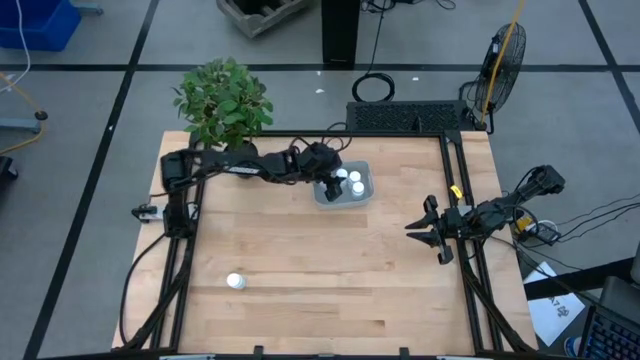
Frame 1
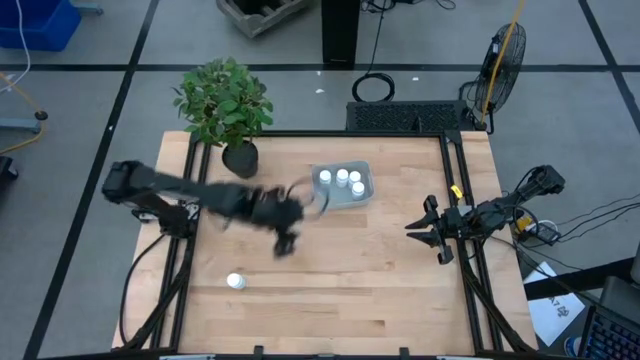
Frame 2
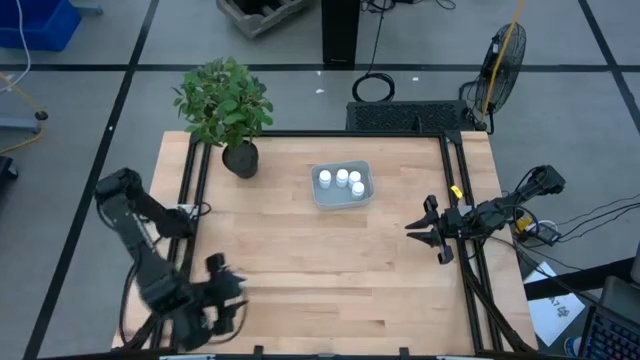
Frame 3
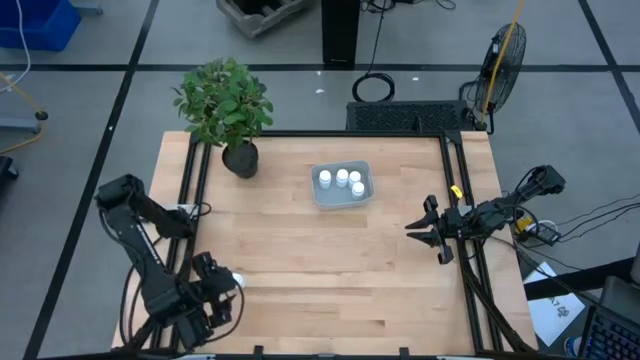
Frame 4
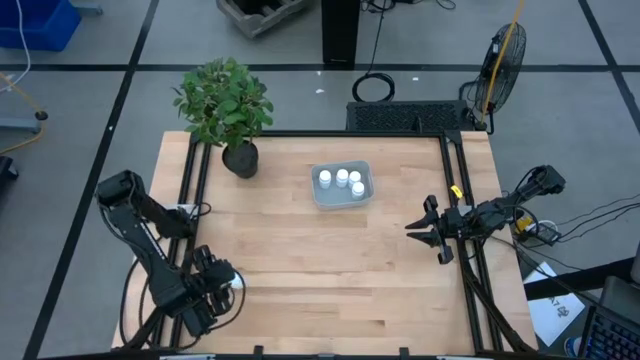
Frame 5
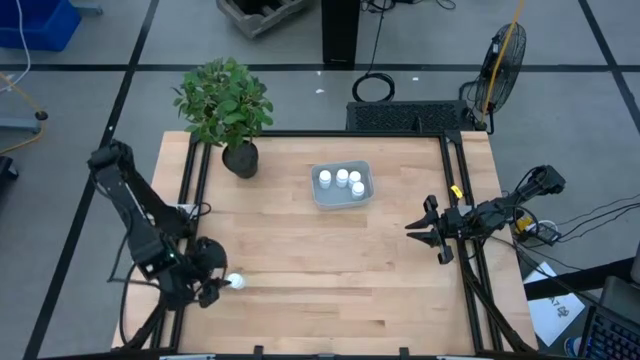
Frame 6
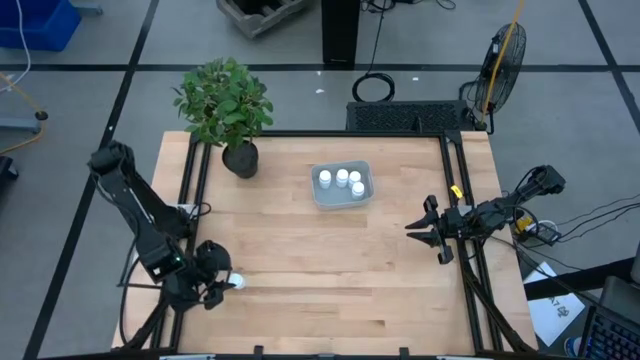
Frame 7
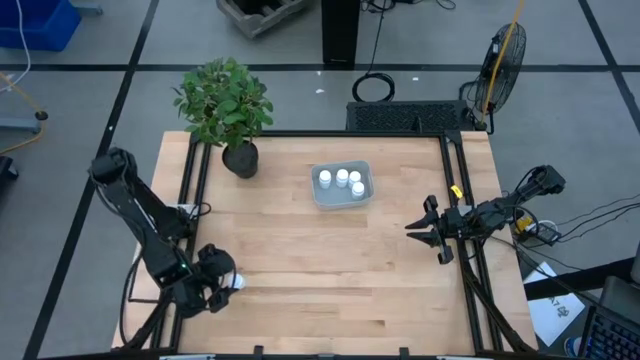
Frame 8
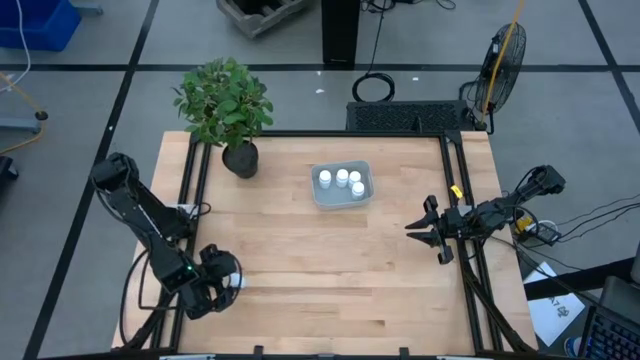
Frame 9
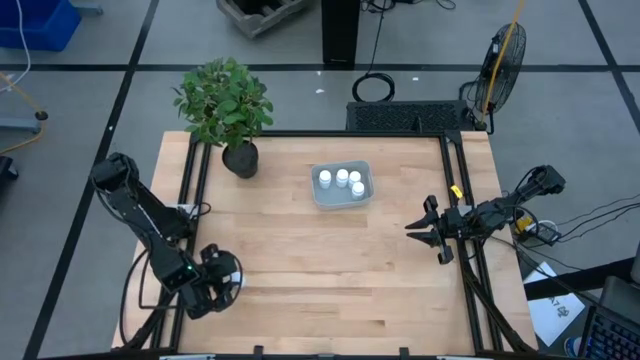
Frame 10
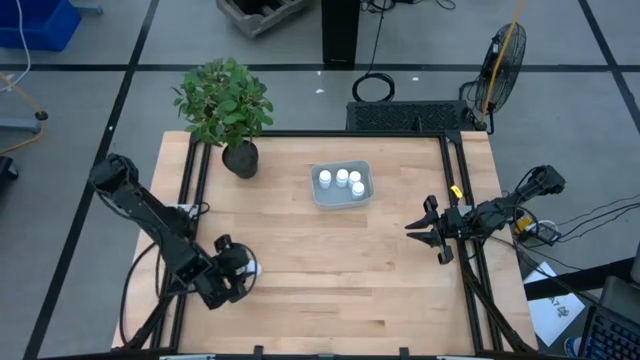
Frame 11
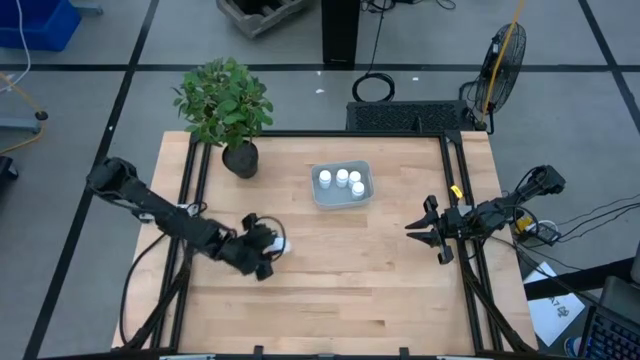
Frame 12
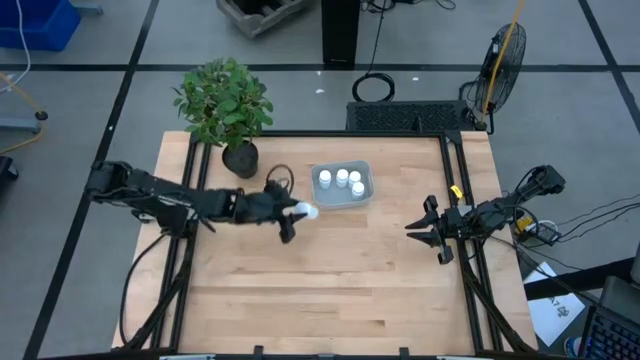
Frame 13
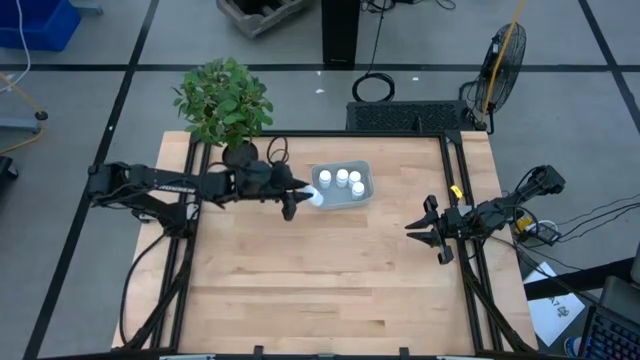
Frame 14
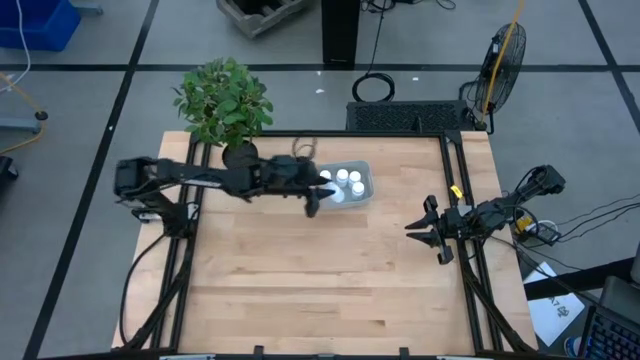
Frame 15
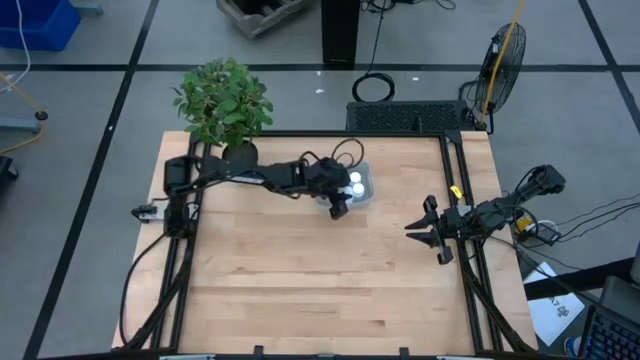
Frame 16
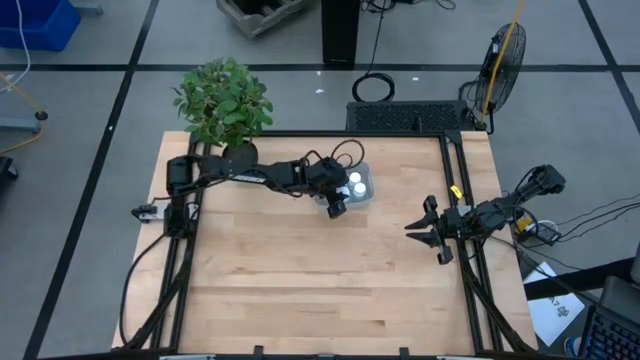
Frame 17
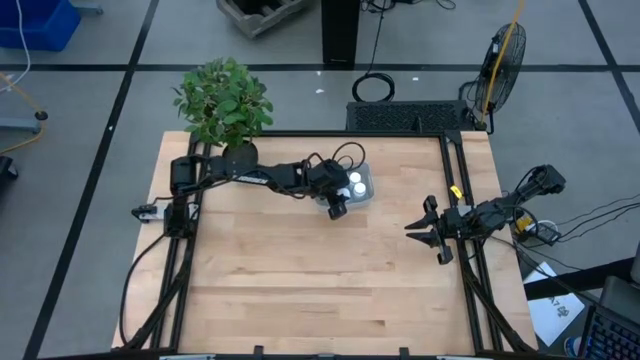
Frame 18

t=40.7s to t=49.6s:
Task: Pick and place pill bottles into a basket
Put the white pill bottle into the white bin

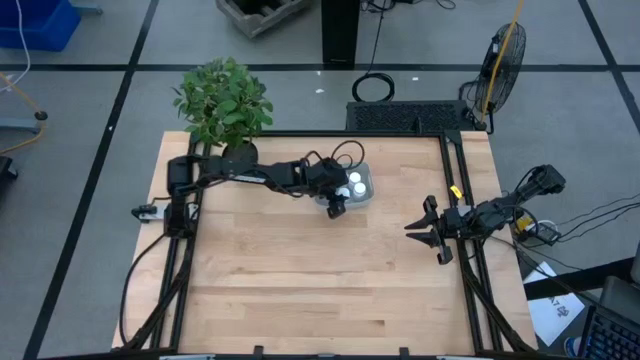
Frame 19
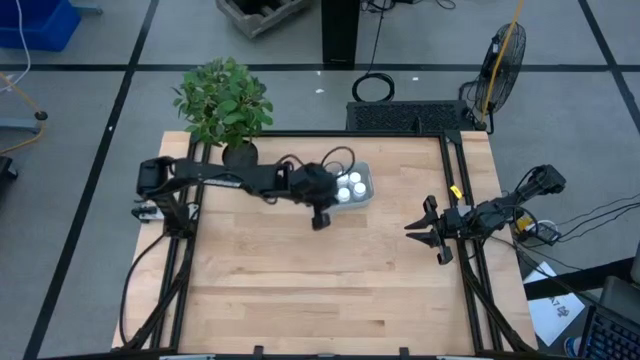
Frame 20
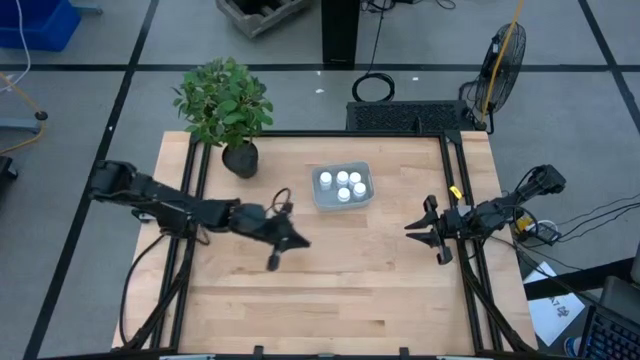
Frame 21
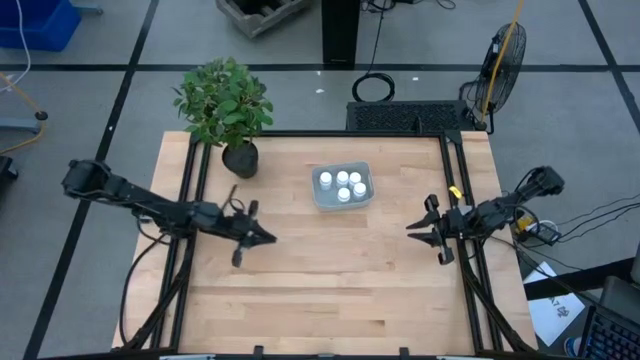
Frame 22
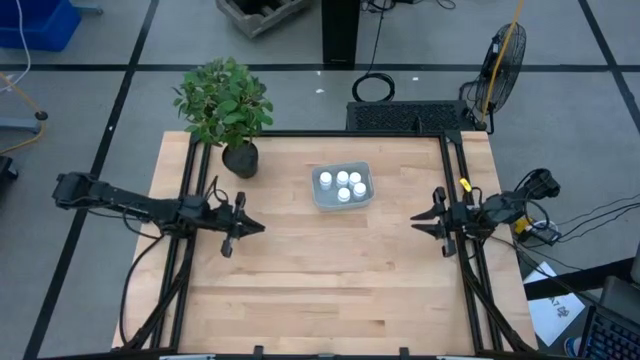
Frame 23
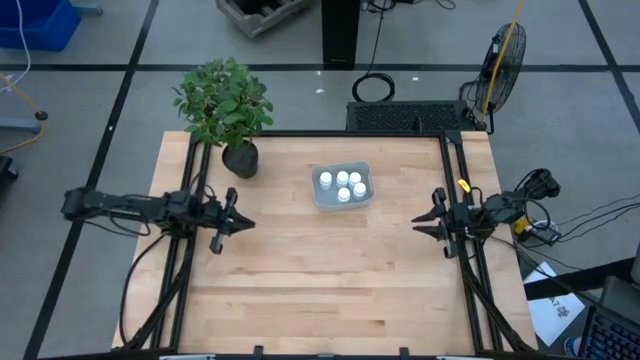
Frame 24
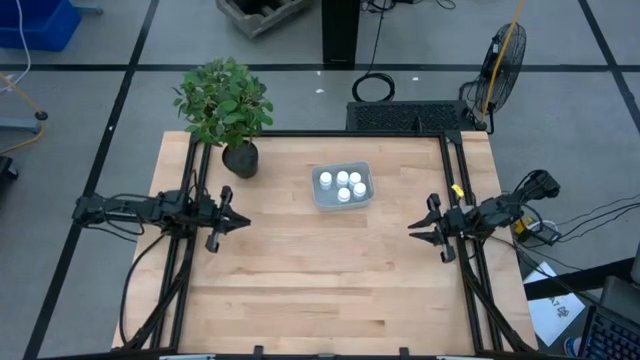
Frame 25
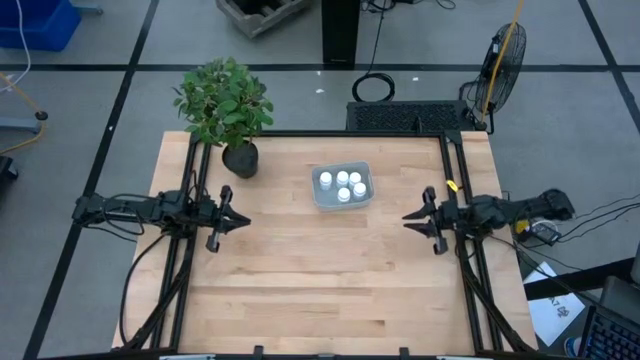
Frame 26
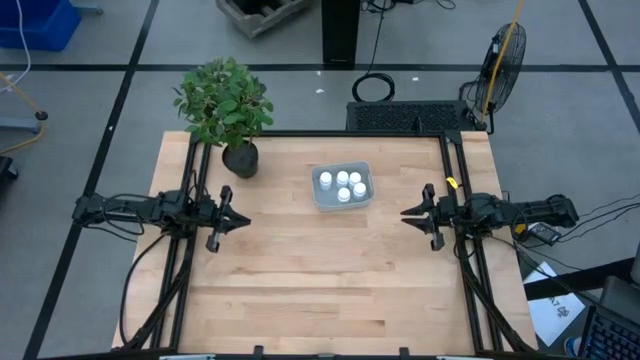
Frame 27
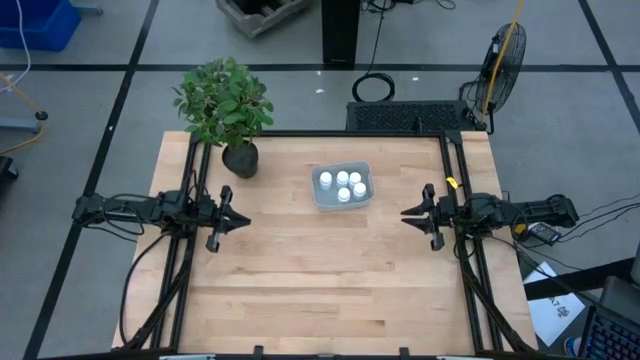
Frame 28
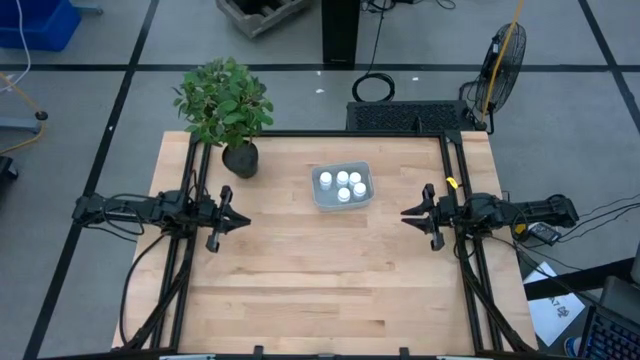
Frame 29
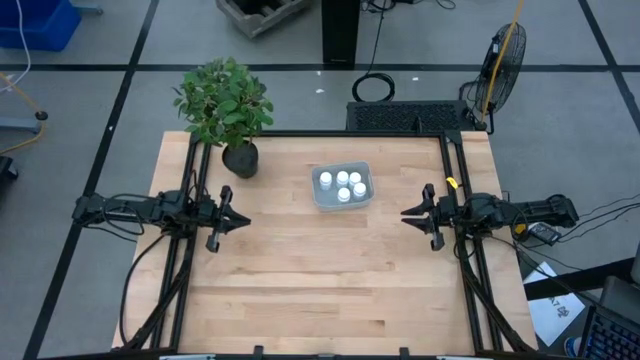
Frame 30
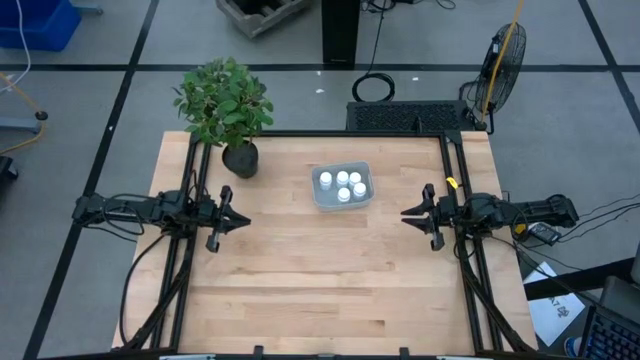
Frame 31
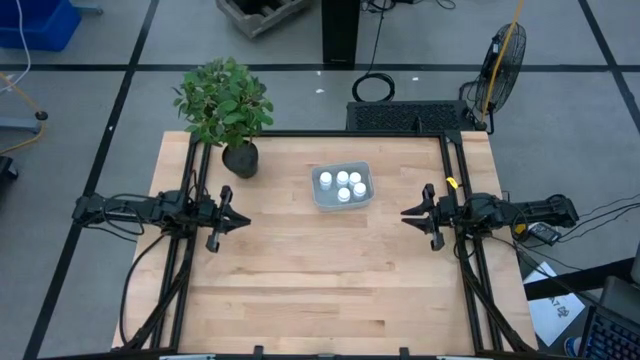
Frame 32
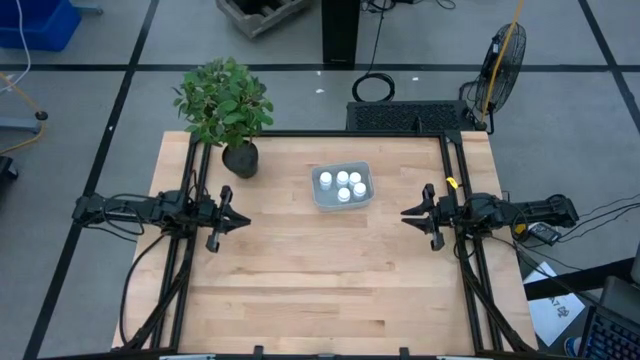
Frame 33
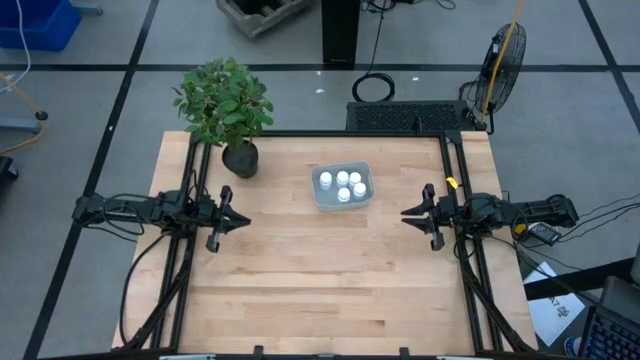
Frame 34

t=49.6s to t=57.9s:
Return to Home Position

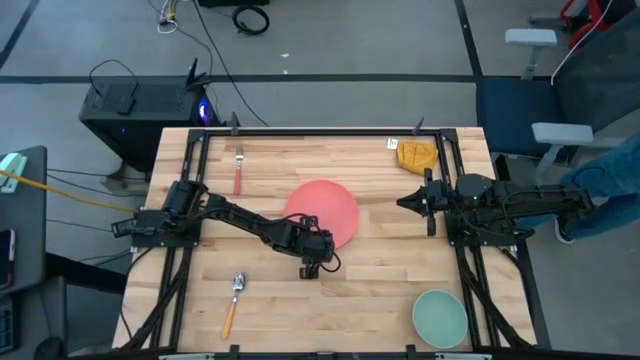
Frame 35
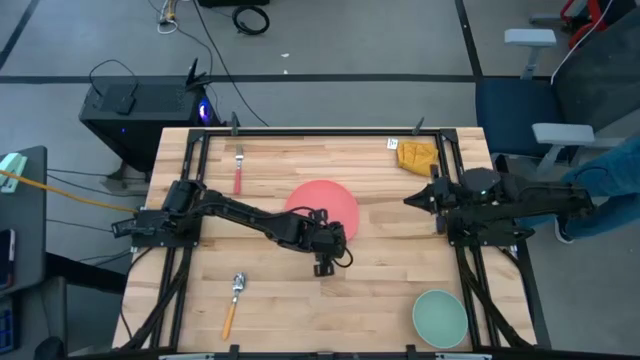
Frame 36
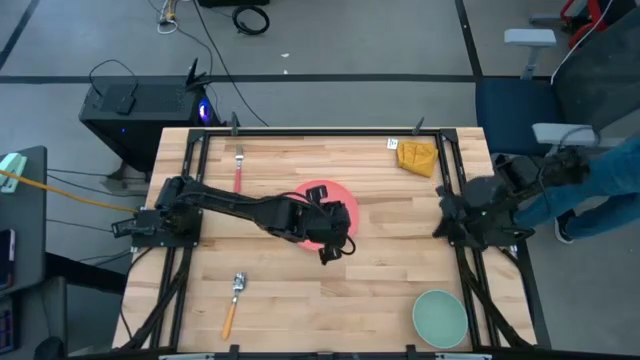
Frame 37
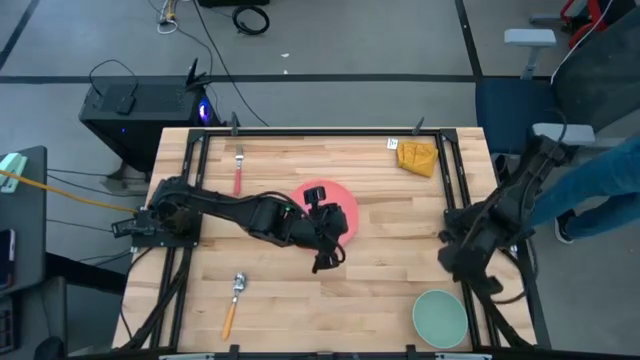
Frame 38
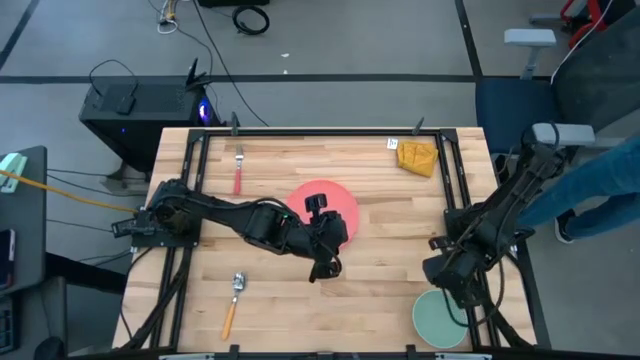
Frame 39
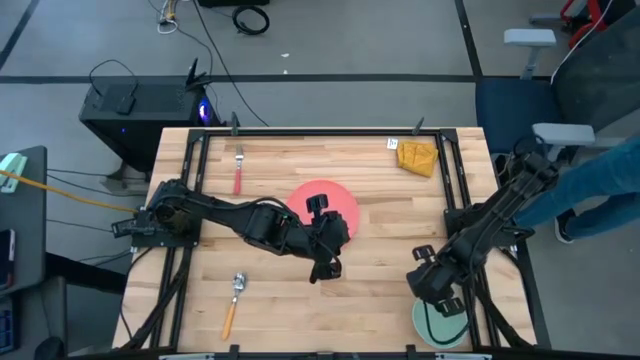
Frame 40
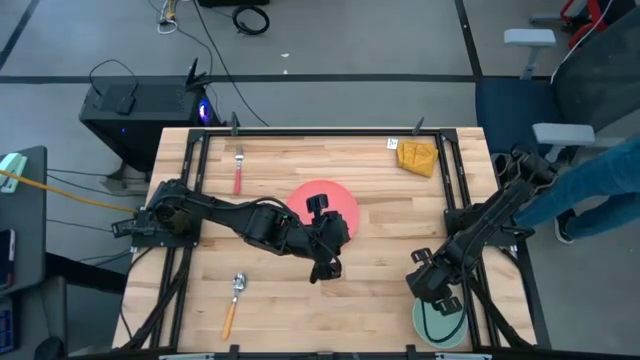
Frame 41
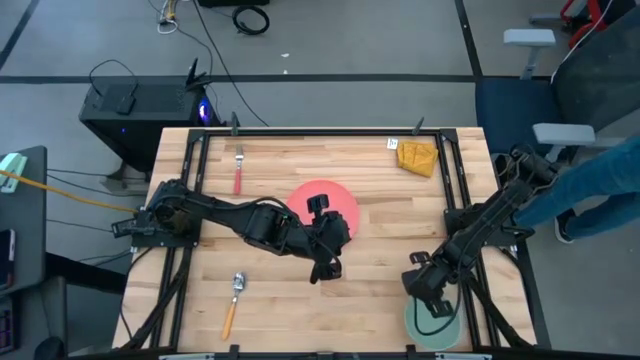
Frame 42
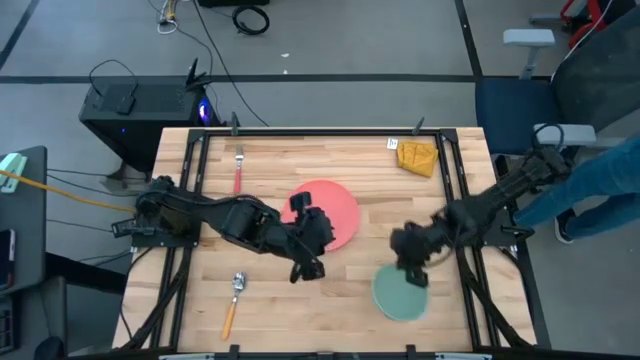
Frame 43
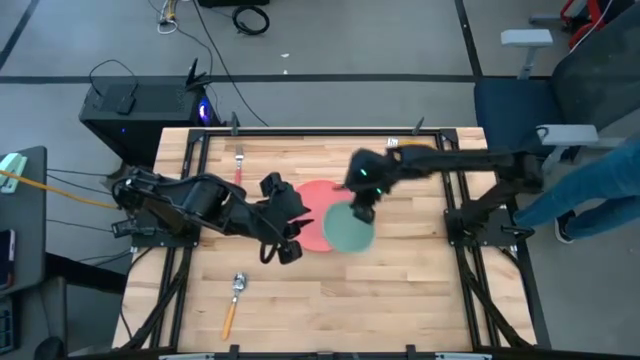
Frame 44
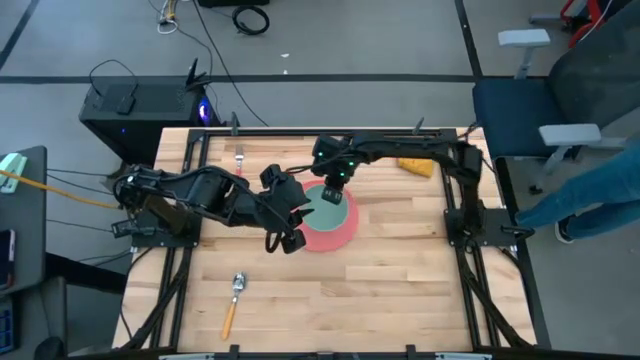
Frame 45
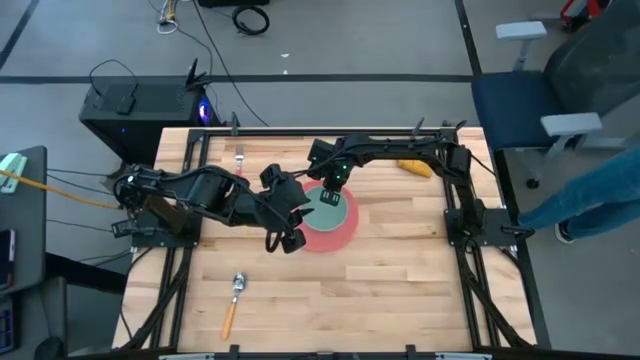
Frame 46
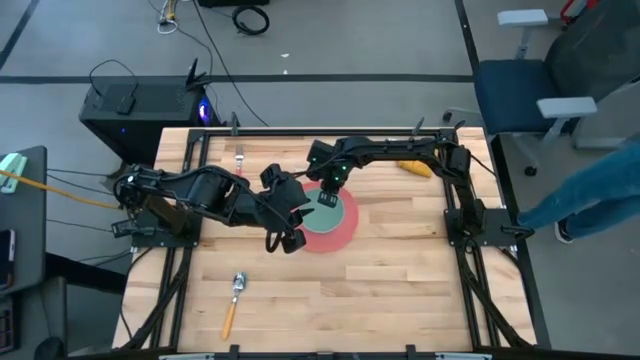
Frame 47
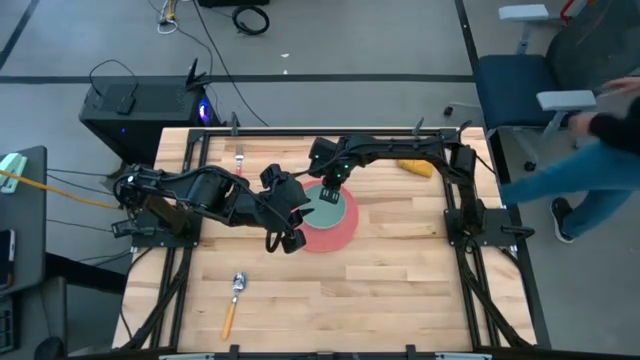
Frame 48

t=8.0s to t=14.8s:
Task: Set table place
Put the green bowl on top of the pink plate
